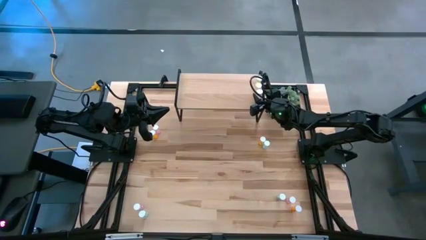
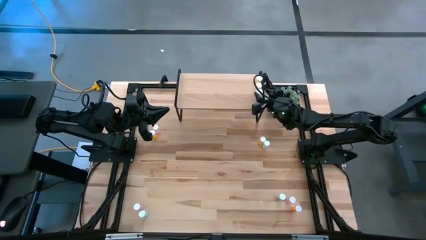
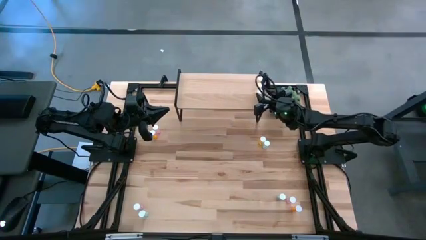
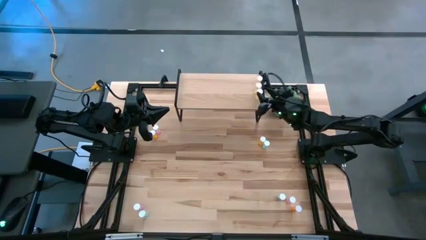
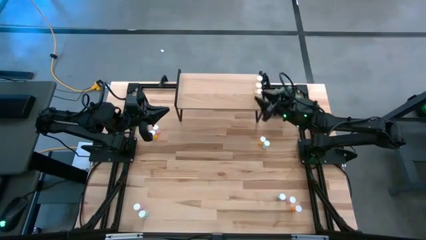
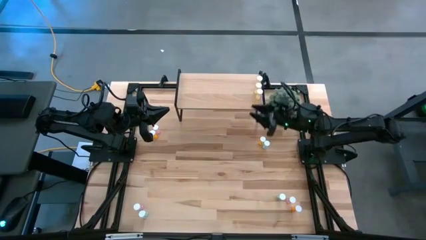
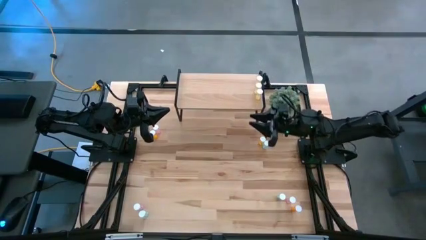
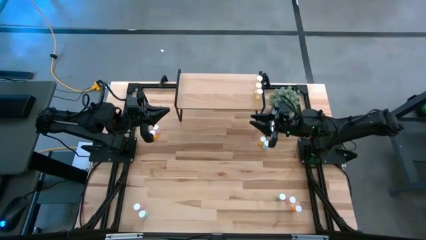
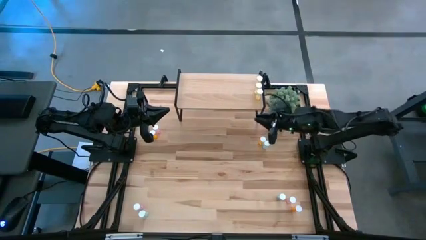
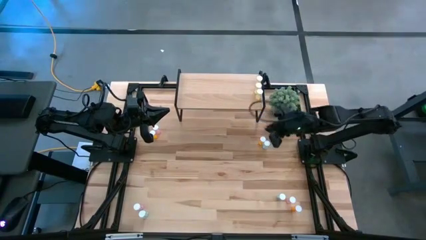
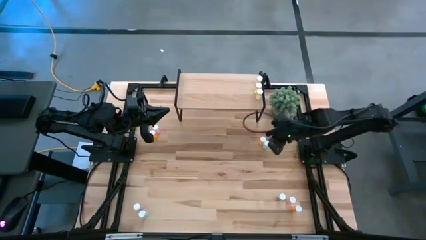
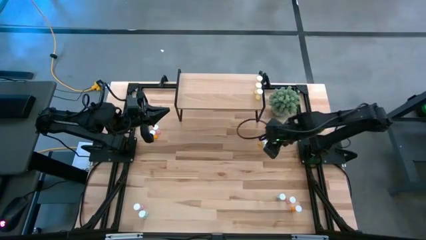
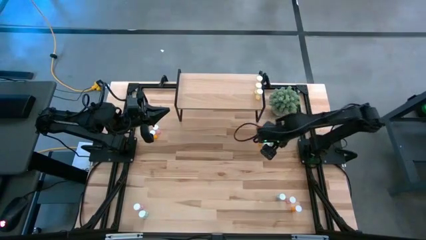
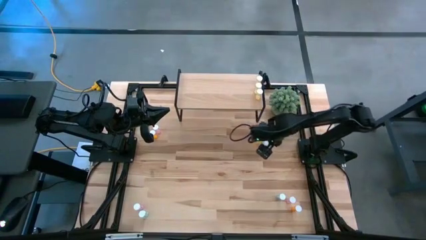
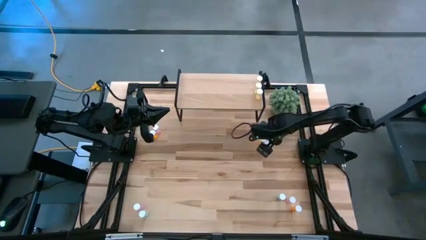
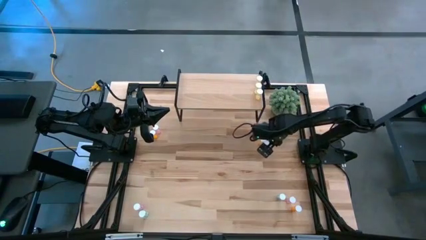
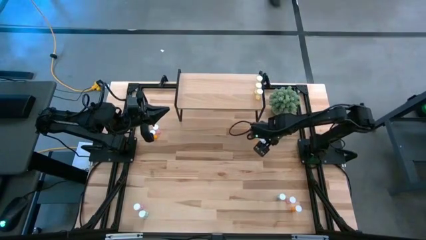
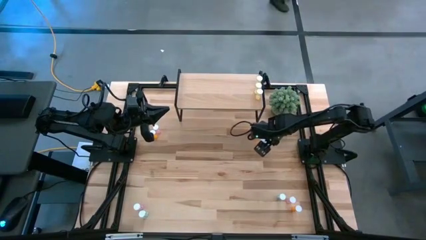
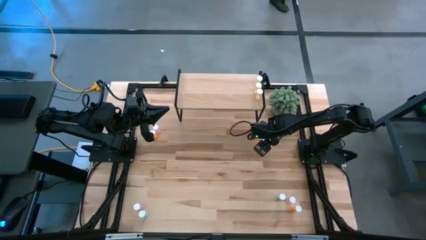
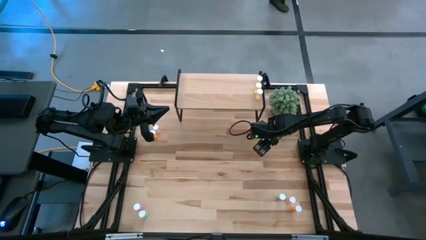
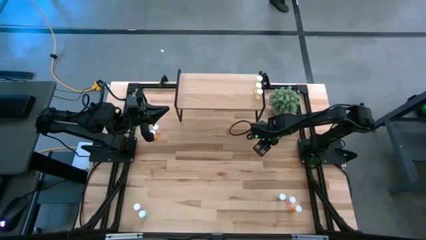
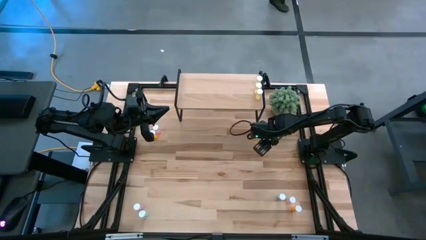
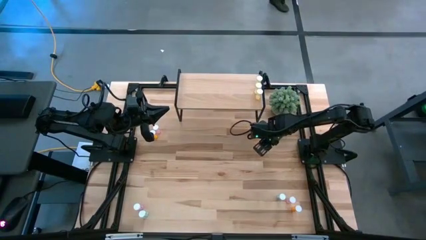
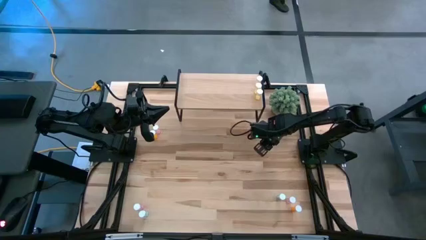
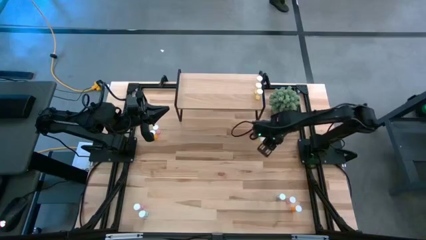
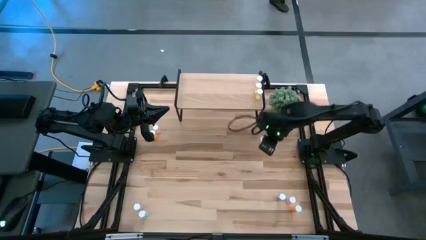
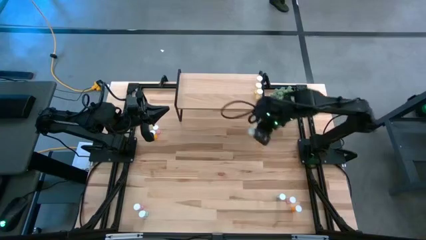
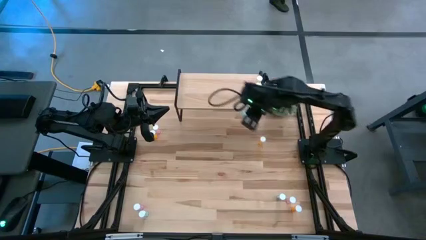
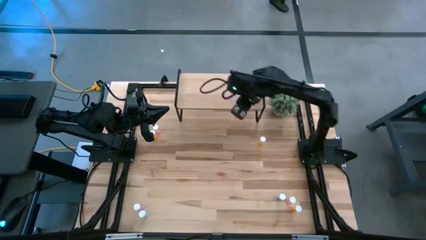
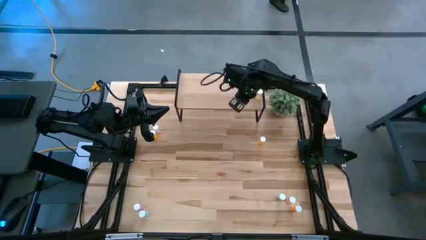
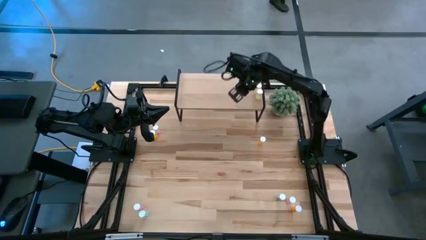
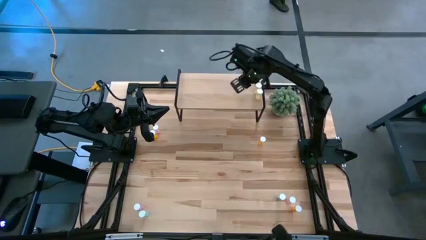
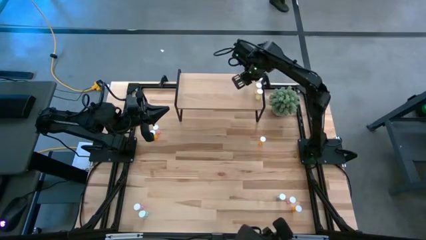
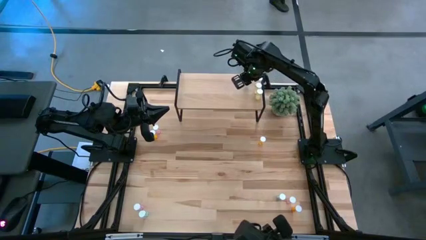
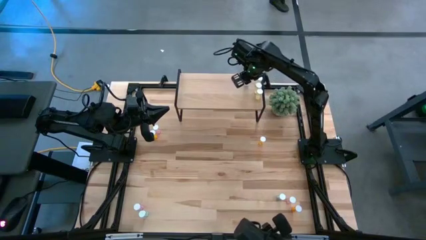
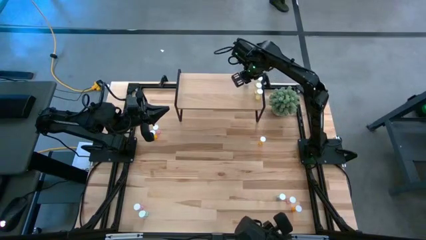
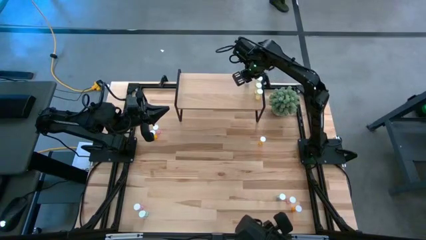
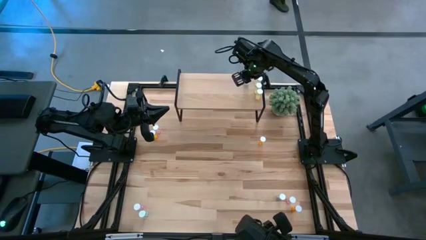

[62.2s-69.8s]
Task: Pick and place medicine bottles onto shelf by color
Put the top right blue pill bottle on the shelf
